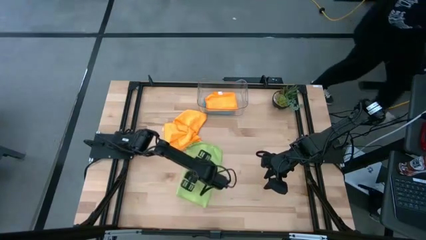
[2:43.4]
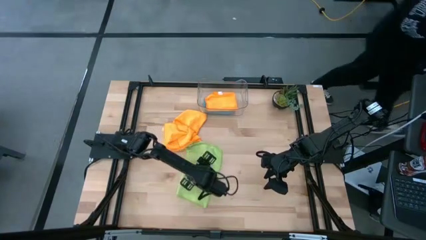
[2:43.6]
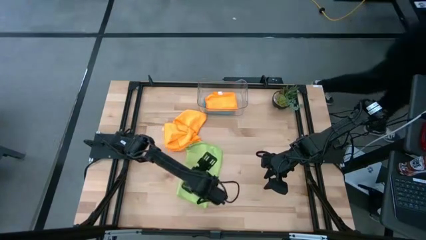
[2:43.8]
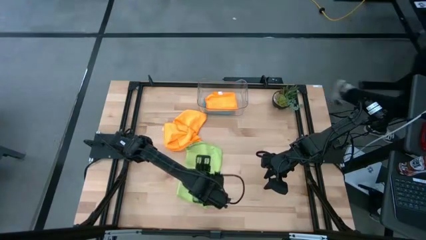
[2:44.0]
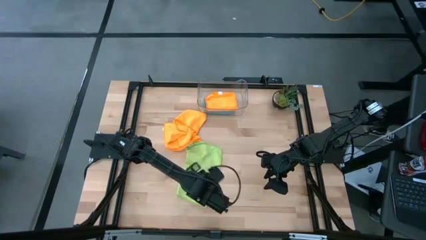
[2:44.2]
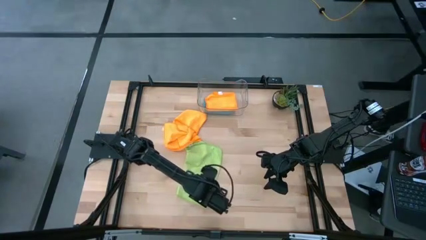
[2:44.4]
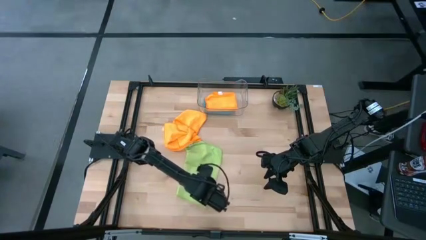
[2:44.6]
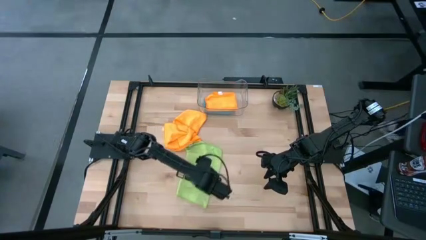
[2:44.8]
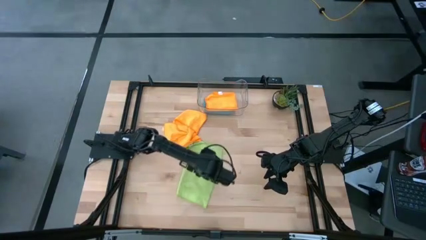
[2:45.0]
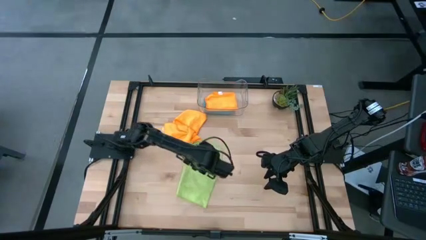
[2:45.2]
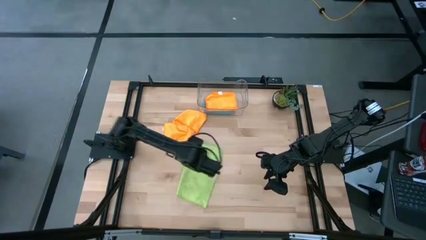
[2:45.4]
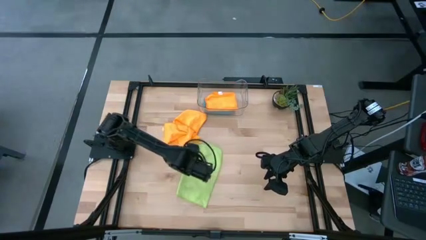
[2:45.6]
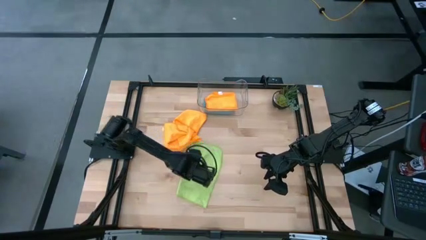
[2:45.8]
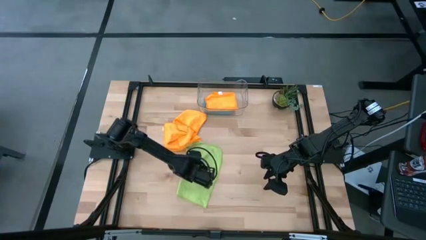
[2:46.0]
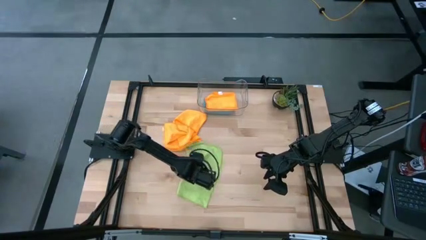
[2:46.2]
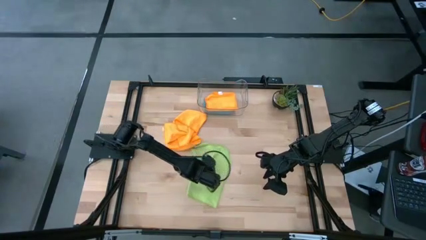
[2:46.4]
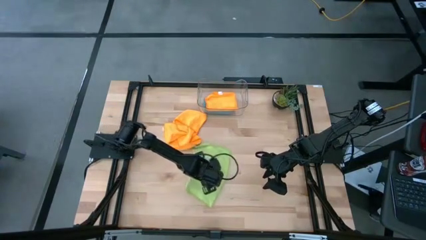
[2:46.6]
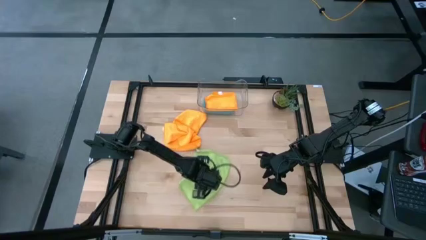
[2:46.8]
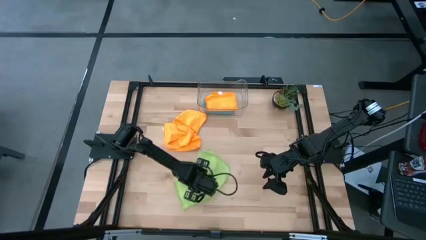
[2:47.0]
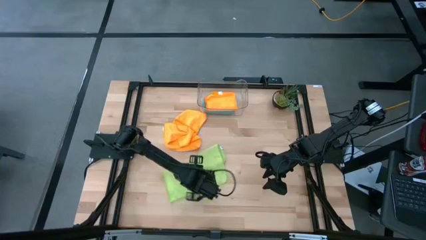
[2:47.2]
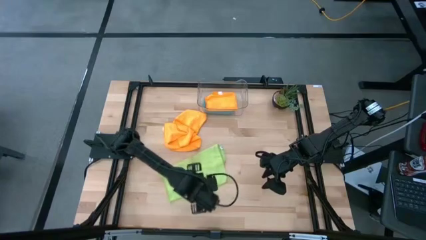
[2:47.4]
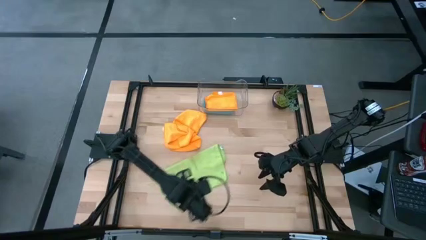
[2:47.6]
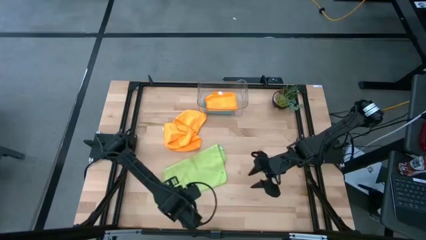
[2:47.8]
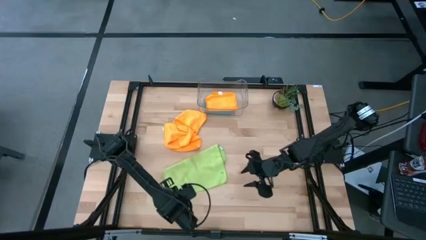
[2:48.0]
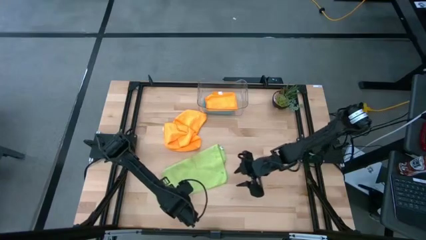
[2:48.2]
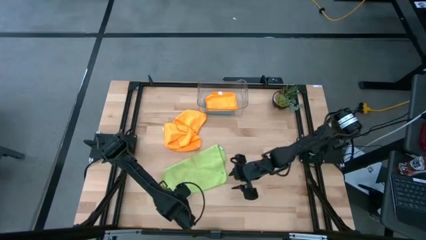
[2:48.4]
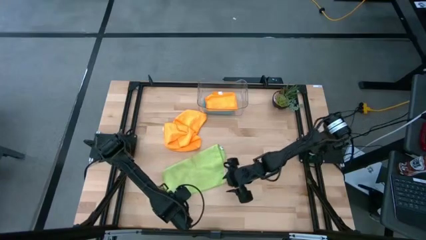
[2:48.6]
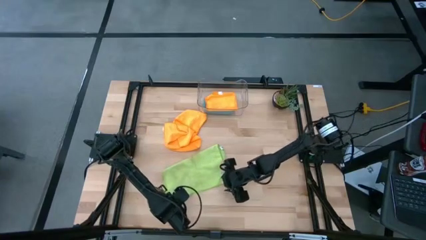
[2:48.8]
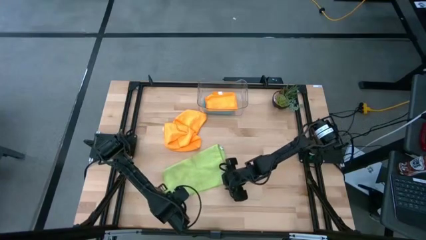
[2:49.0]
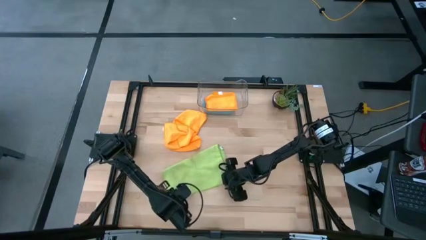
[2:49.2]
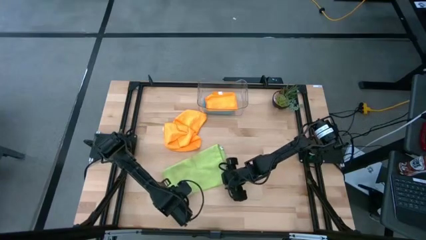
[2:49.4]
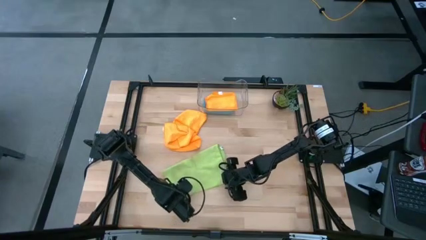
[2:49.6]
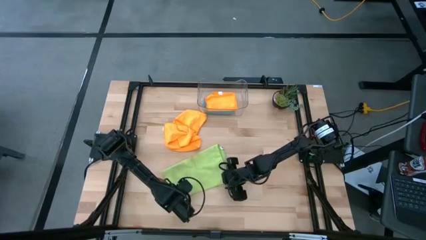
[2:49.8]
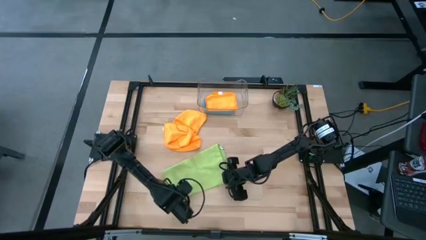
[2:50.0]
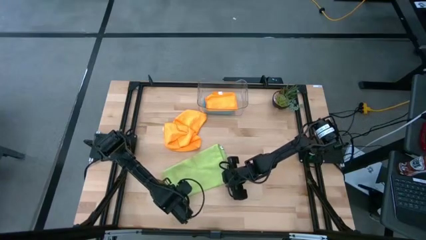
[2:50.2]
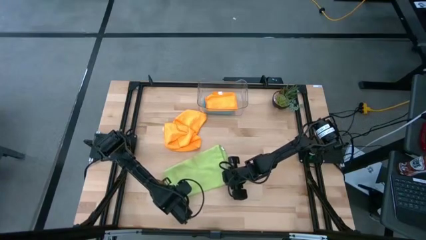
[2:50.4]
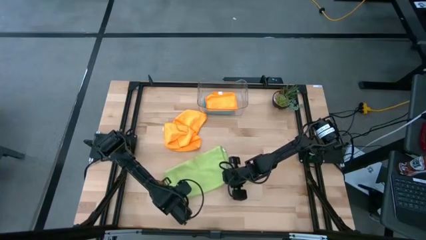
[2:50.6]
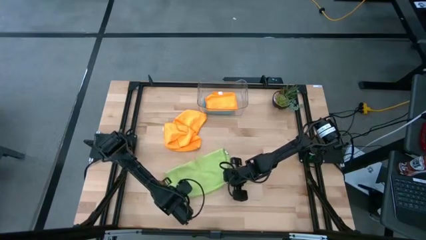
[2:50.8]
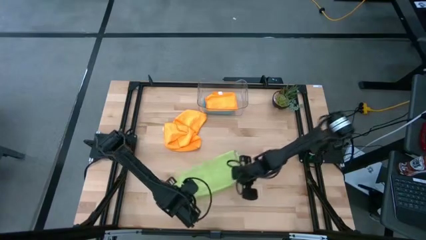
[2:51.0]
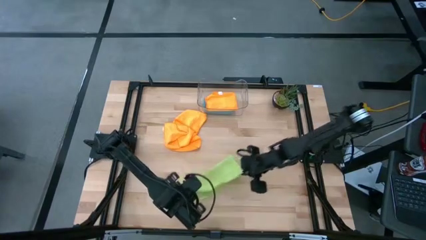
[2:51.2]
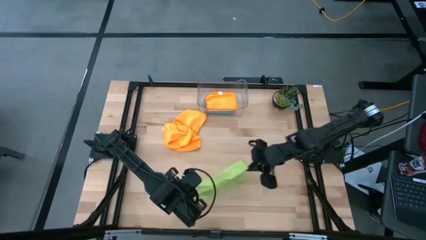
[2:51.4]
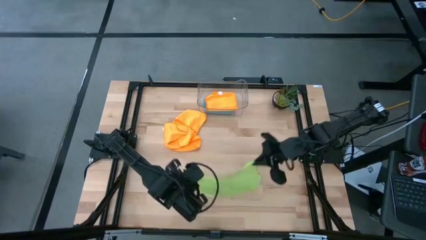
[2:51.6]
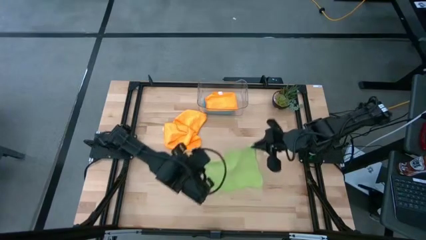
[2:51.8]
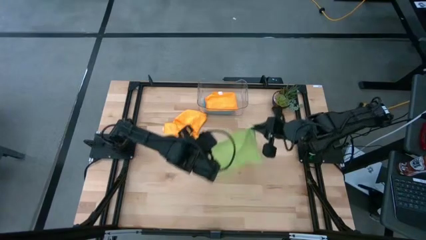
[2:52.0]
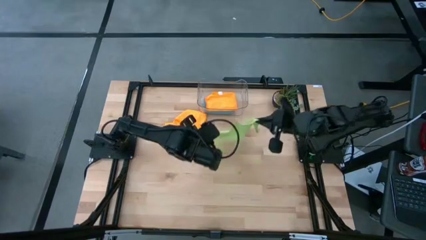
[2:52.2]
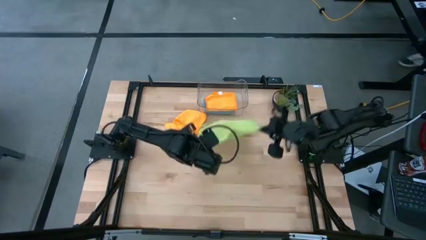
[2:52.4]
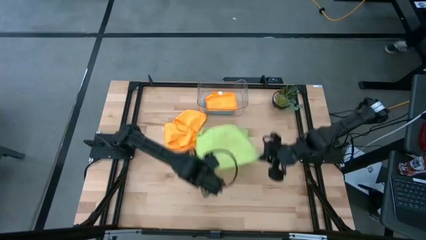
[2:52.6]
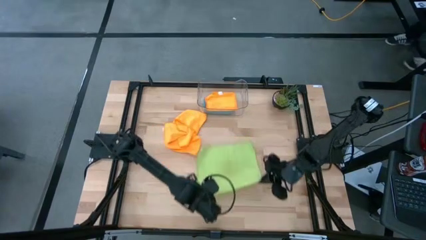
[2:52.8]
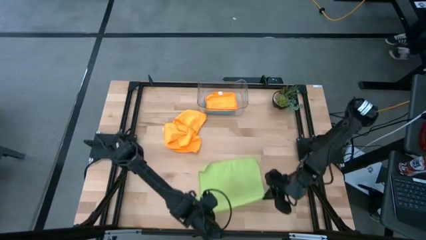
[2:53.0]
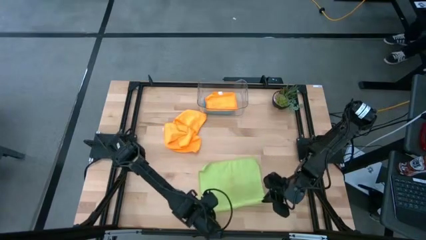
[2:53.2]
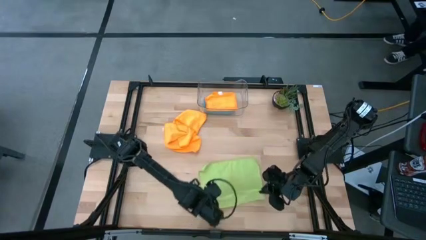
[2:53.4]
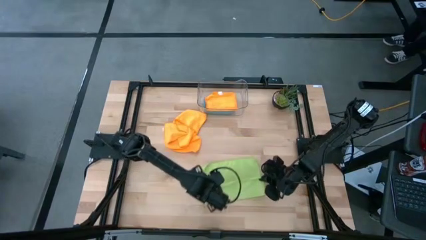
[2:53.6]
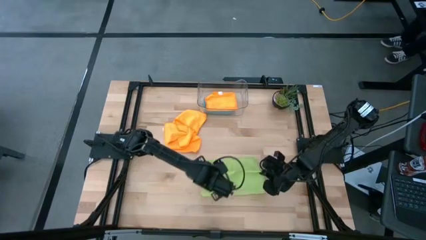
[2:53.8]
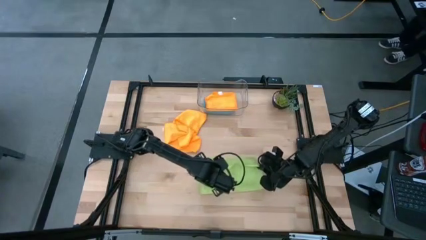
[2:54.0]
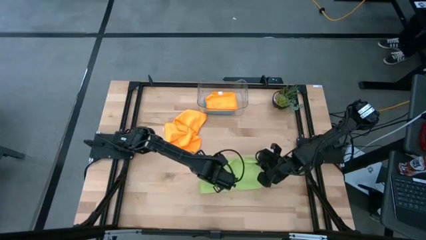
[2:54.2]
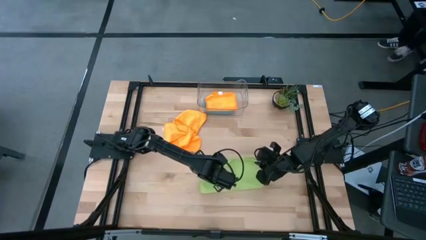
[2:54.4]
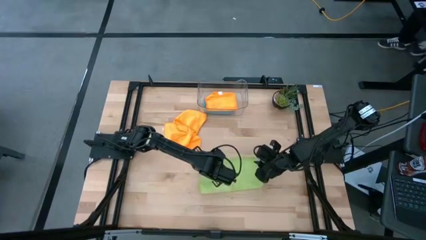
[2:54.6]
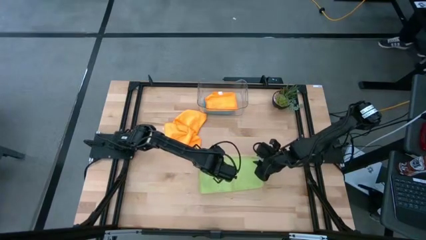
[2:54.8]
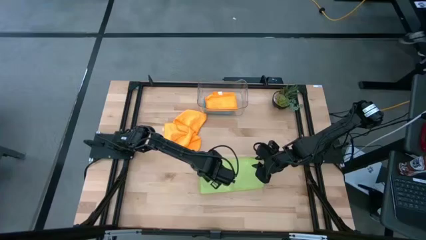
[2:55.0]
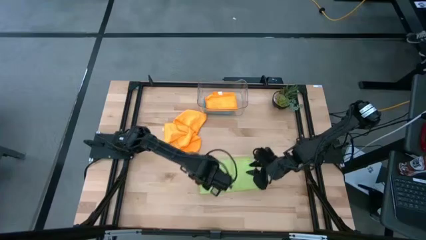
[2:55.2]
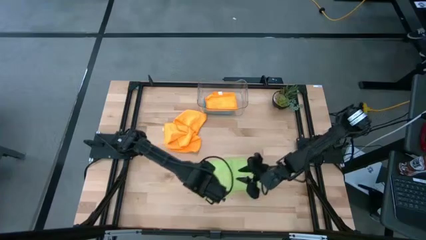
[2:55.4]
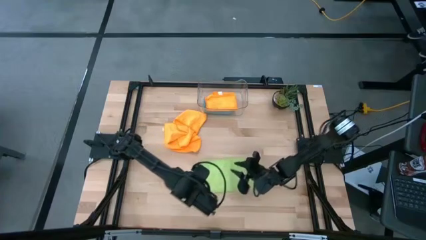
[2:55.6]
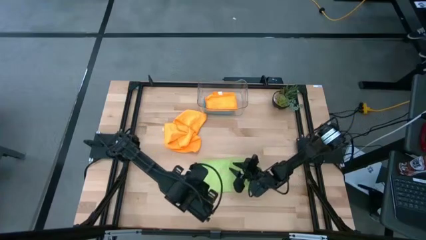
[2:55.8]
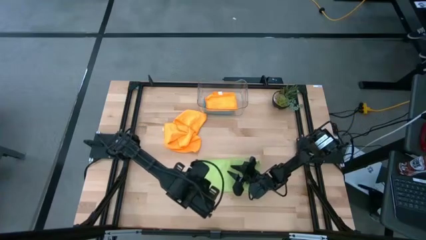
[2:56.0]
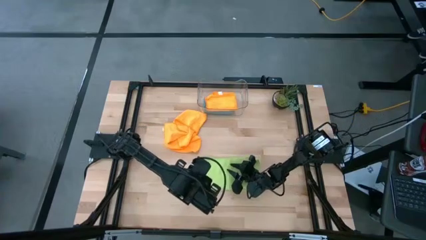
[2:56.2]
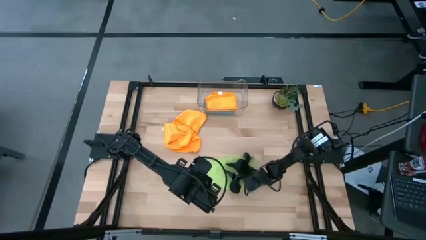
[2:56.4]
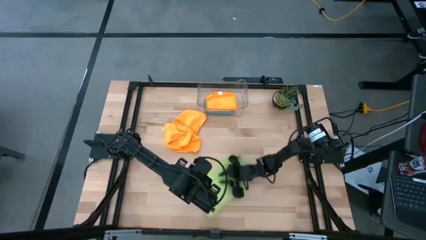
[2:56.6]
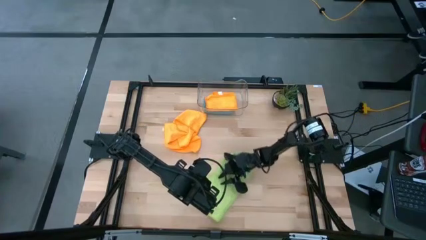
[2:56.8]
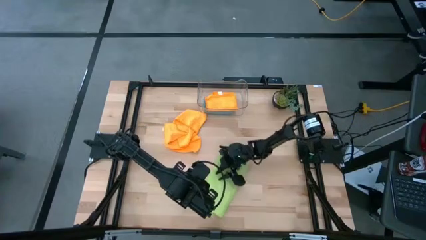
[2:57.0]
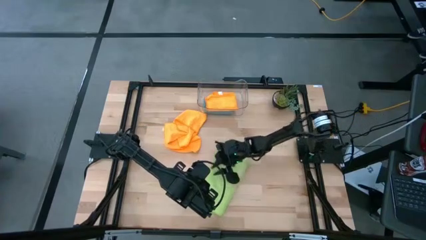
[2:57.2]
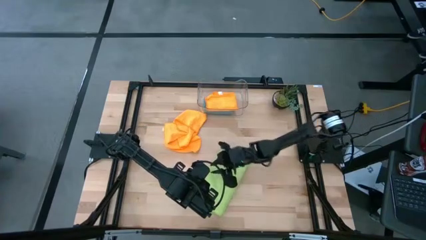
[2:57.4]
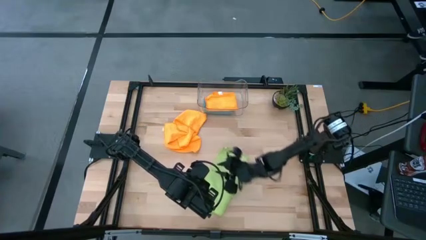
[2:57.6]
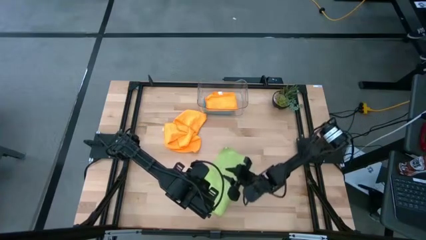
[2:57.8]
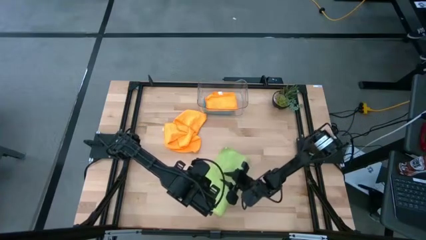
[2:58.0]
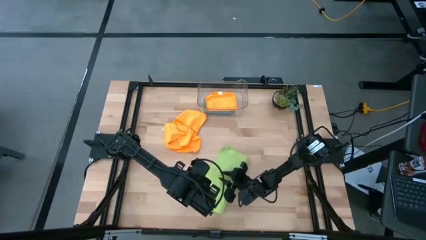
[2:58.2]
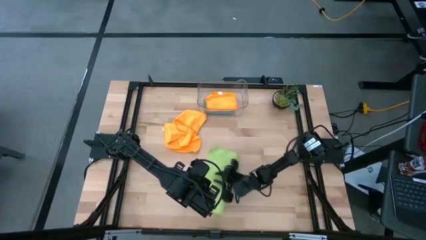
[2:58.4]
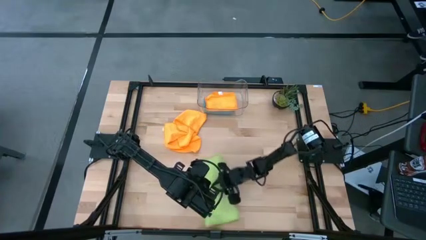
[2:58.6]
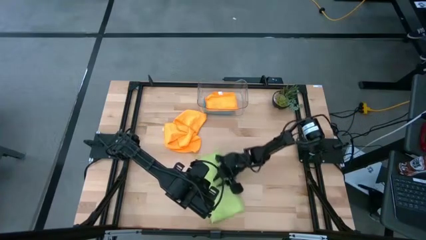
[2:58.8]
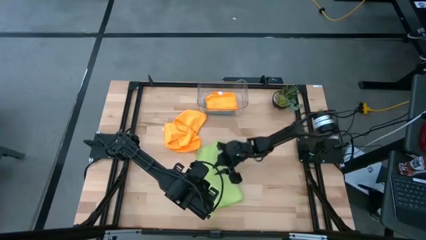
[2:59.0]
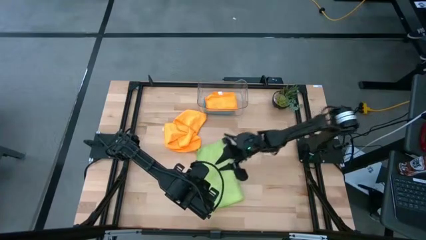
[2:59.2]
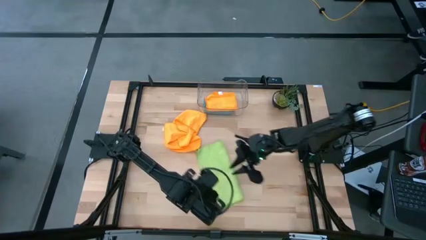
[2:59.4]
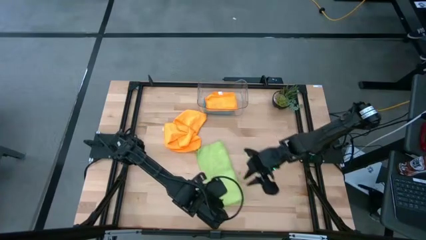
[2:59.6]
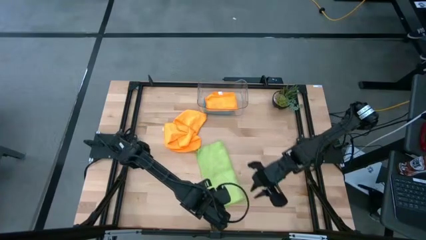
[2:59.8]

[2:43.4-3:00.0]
Task: Fold microfiber towels
Fold the green microfiber cloth
